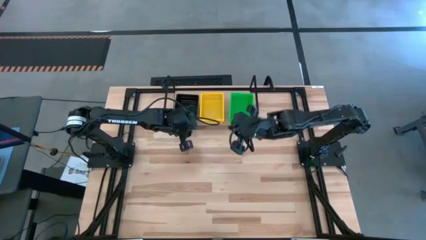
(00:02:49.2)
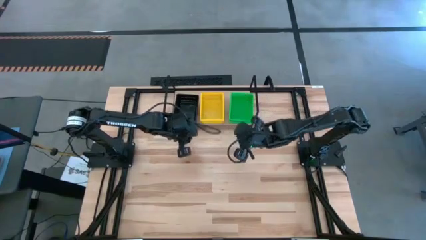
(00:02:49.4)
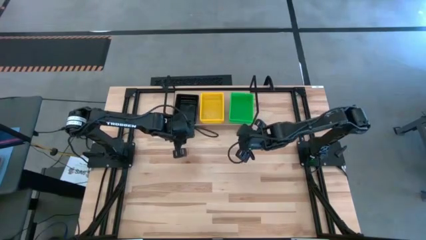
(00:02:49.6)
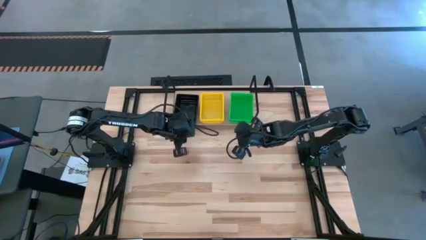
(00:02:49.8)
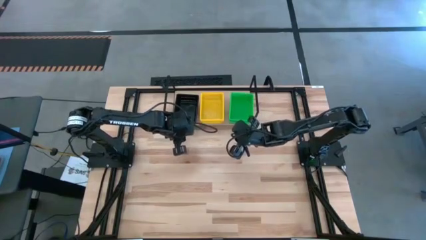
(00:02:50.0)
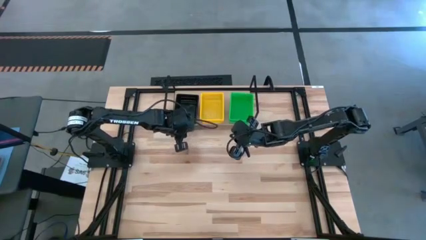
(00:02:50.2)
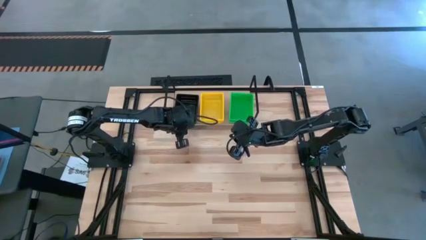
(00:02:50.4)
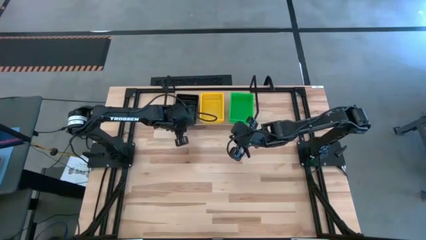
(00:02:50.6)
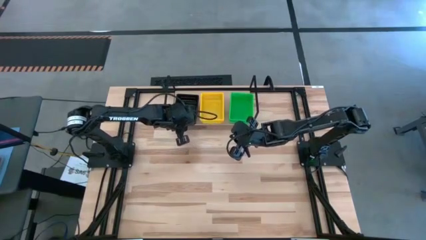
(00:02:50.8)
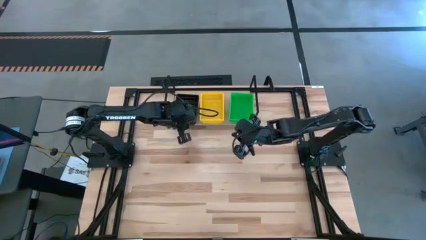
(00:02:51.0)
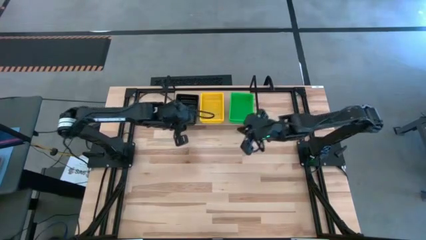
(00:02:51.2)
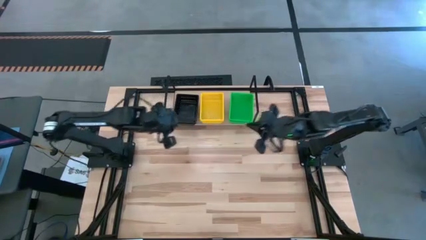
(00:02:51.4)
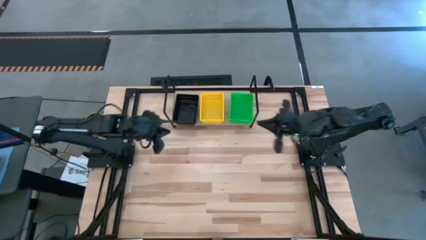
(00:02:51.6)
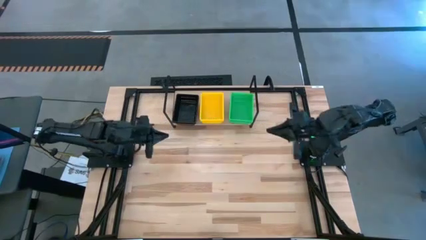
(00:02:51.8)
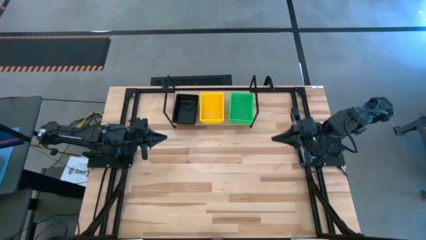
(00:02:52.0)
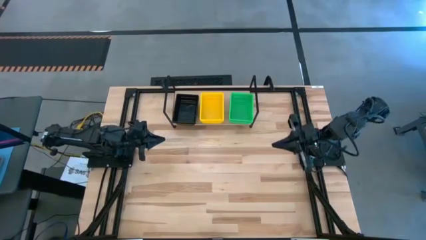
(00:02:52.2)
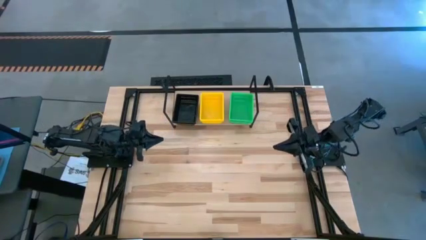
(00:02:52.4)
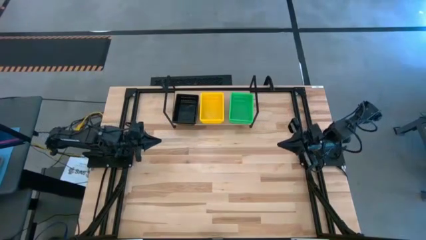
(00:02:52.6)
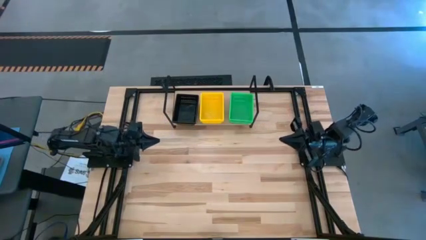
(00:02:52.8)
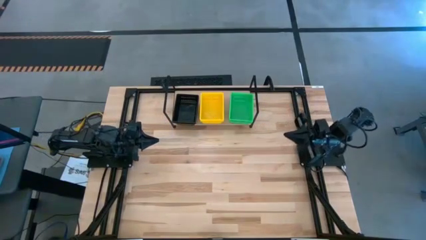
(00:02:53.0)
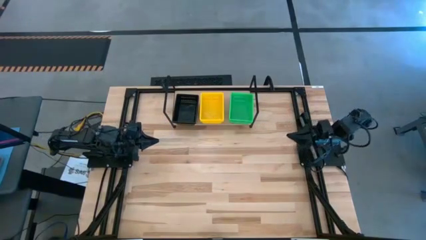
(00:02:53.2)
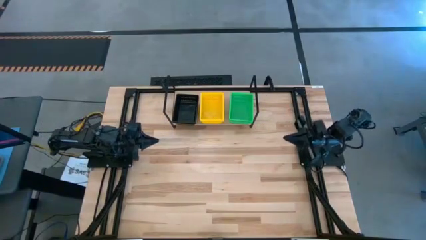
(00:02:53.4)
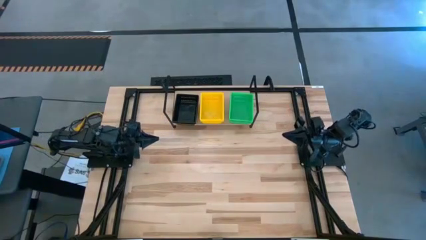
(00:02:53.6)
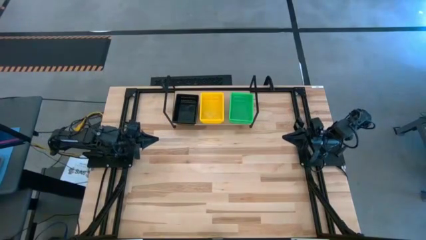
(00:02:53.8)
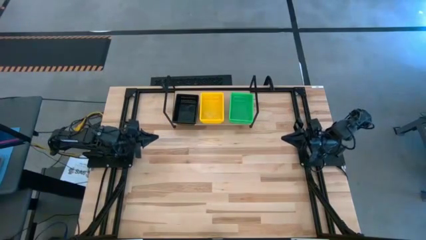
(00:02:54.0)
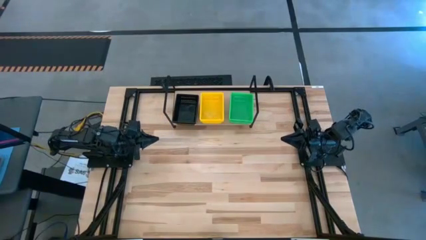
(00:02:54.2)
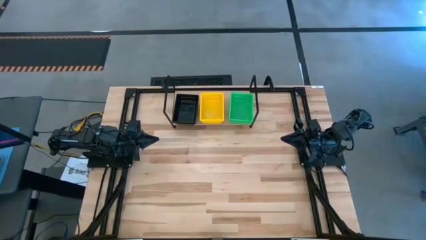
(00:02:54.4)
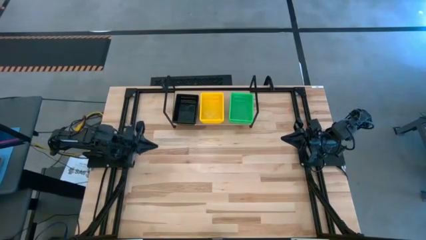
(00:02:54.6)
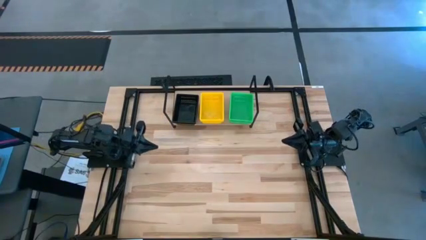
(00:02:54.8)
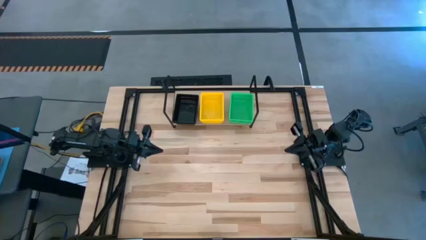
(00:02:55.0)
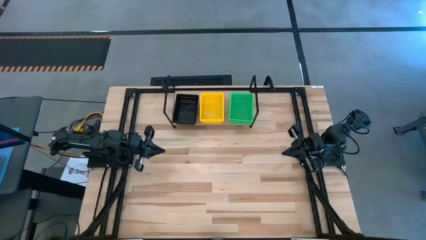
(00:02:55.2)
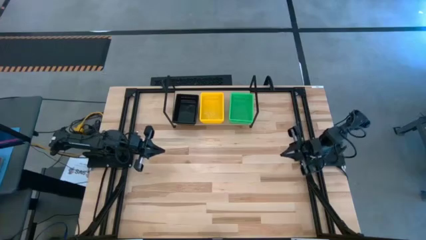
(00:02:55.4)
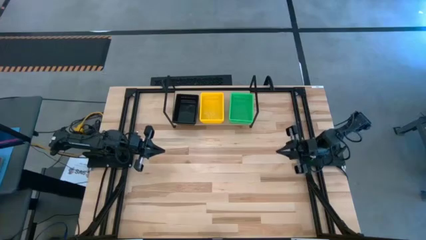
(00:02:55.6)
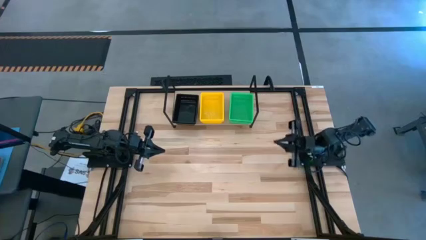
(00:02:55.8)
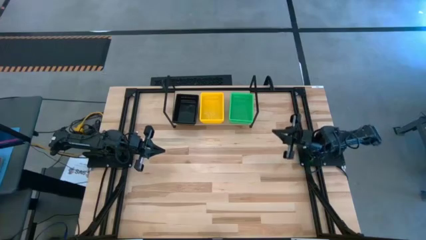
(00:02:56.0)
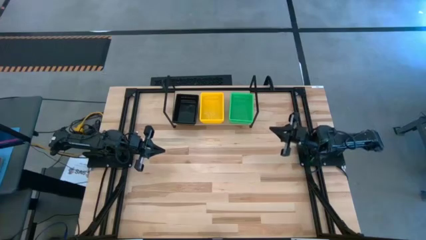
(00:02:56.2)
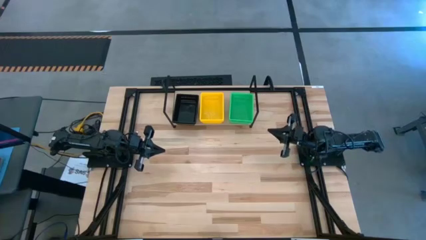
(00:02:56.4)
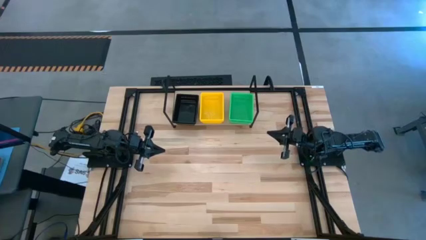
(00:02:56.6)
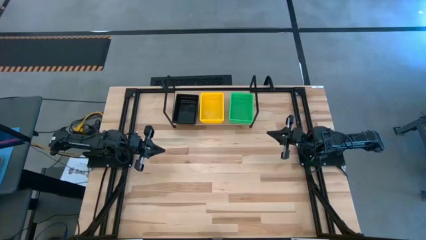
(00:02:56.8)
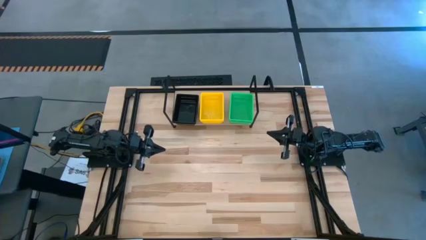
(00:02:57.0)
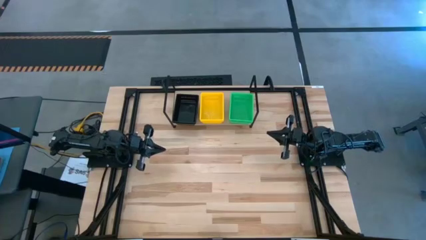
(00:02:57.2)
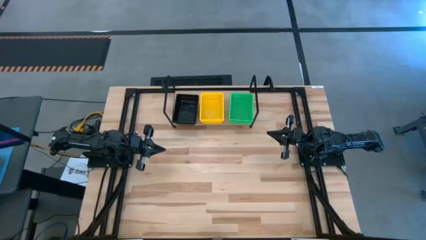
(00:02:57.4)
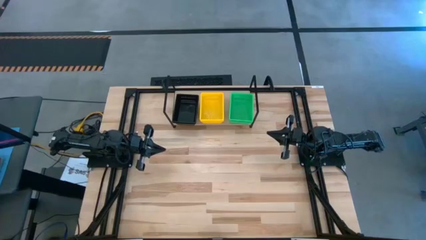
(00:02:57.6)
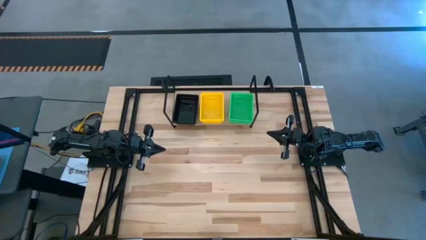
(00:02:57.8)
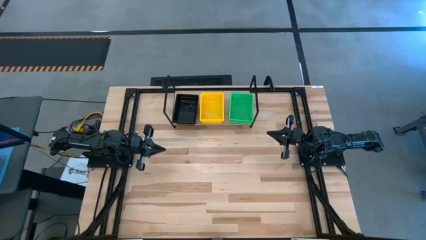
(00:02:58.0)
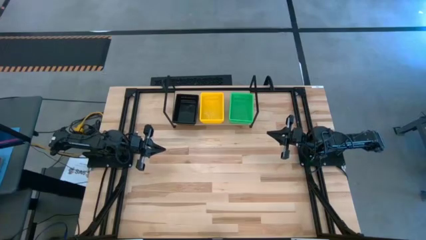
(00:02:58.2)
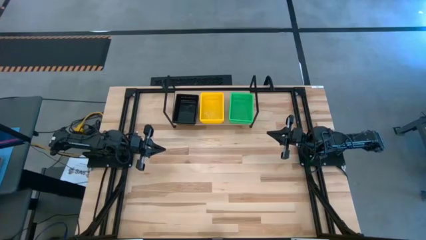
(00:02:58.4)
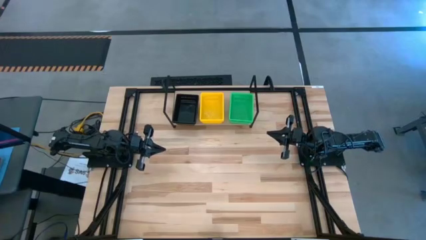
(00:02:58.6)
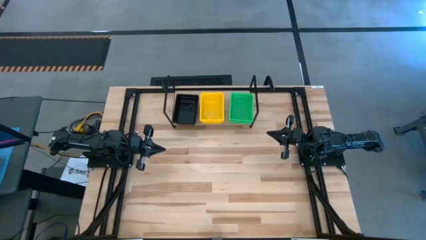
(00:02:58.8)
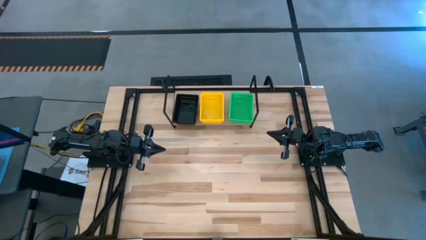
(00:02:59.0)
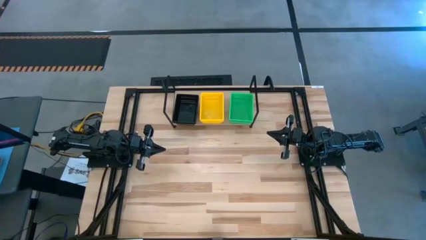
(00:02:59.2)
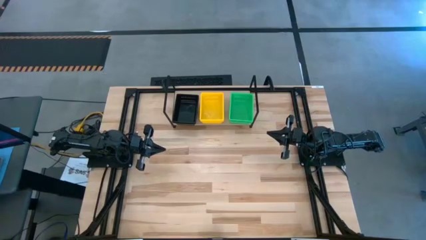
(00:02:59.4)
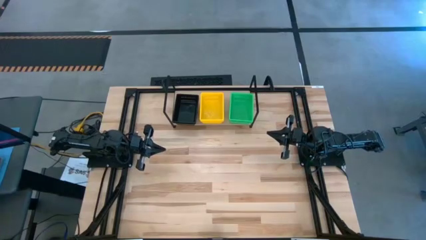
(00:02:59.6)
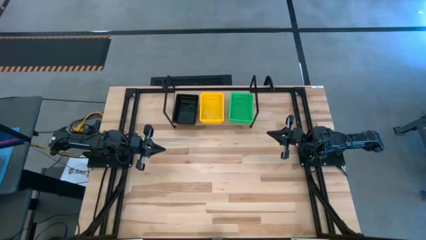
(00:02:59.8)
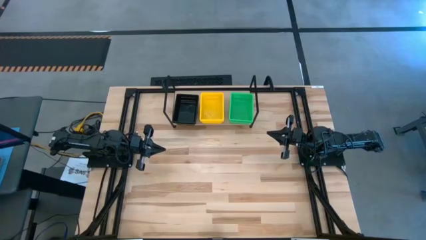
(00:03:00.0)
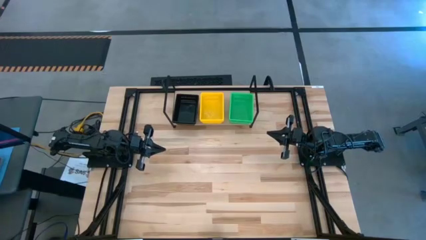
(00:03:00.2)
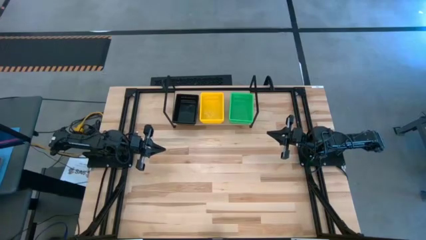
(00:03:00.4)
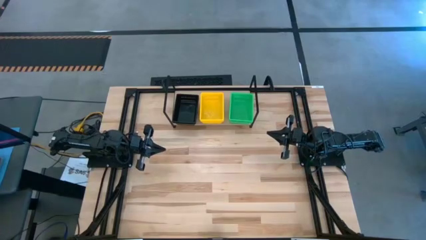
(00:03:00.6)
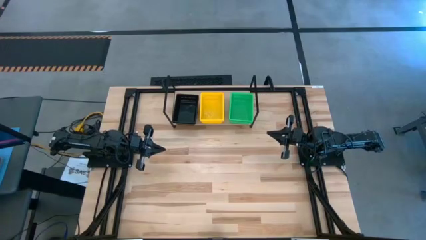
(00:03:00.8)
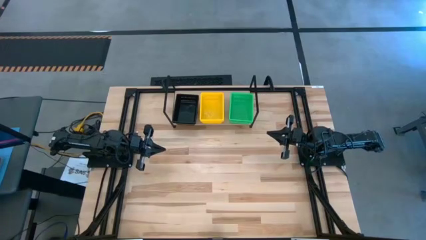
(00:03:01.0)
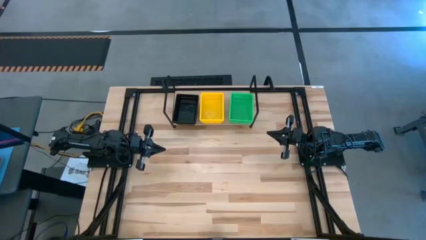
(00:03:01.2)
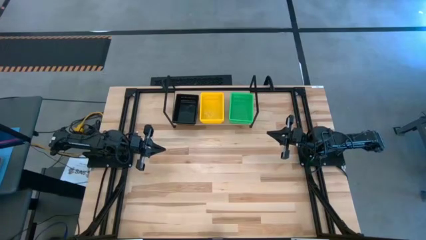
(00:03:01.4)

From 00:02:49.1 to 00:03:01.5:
Task: Stack baskets on shelf by color
Return to Home Position

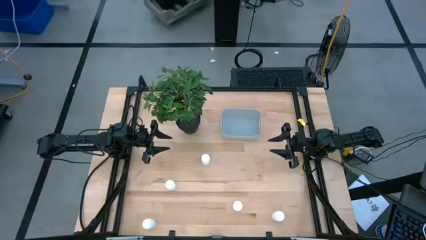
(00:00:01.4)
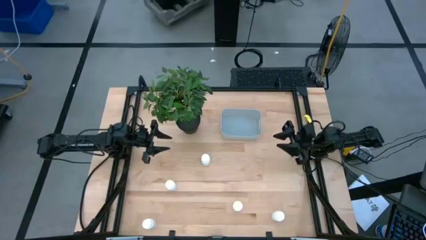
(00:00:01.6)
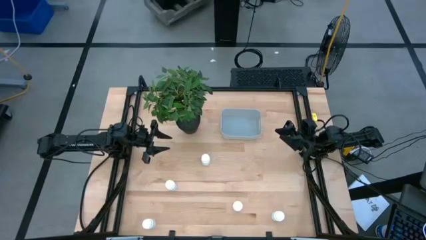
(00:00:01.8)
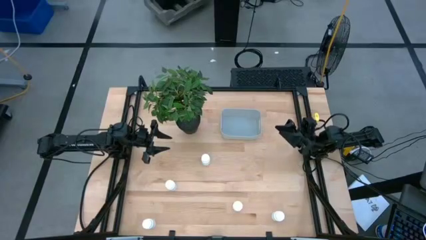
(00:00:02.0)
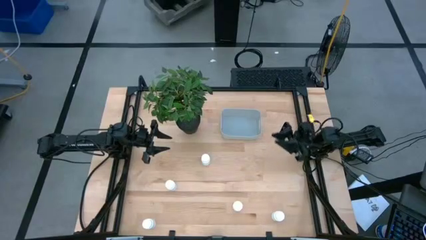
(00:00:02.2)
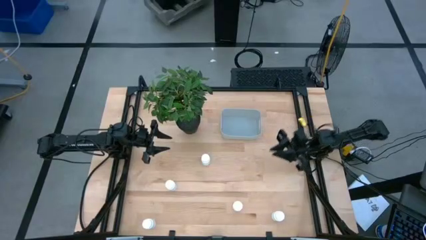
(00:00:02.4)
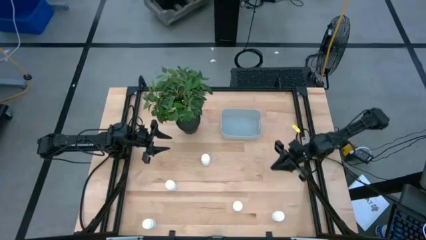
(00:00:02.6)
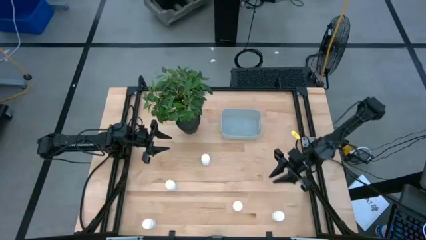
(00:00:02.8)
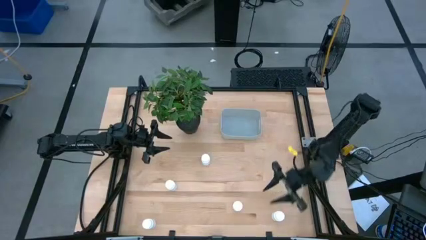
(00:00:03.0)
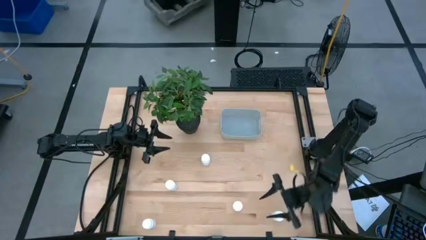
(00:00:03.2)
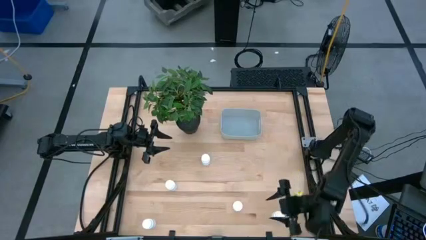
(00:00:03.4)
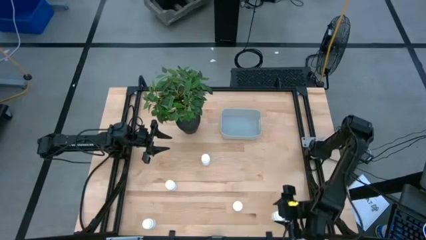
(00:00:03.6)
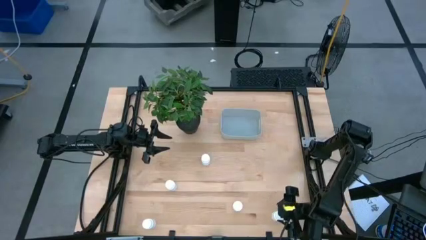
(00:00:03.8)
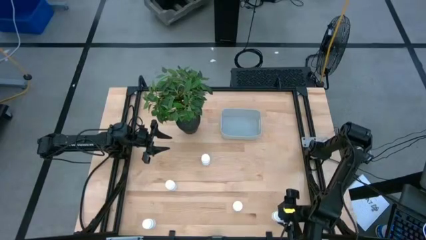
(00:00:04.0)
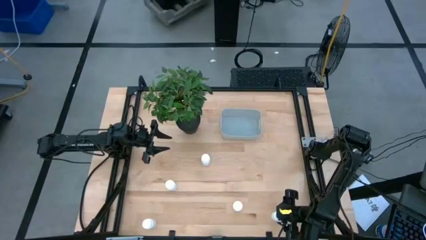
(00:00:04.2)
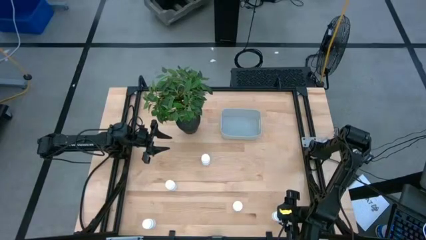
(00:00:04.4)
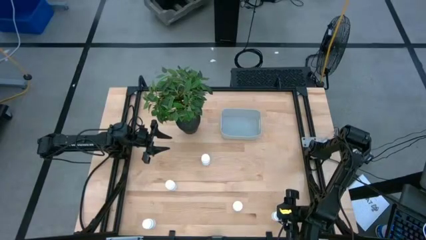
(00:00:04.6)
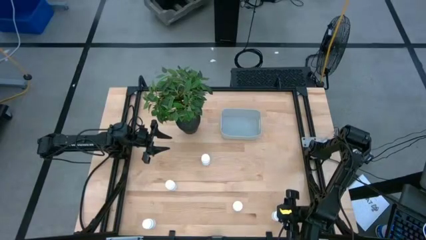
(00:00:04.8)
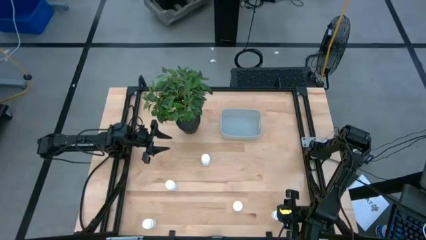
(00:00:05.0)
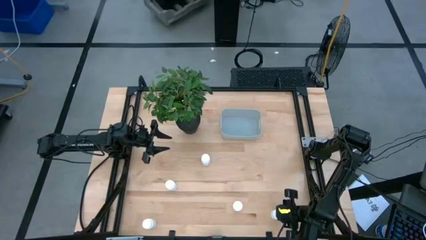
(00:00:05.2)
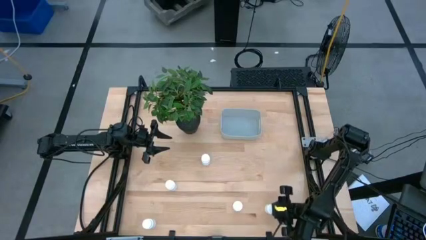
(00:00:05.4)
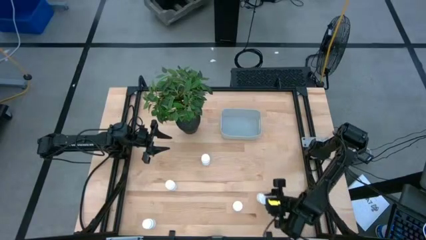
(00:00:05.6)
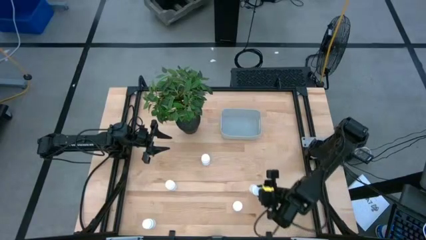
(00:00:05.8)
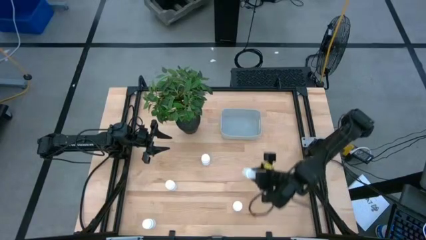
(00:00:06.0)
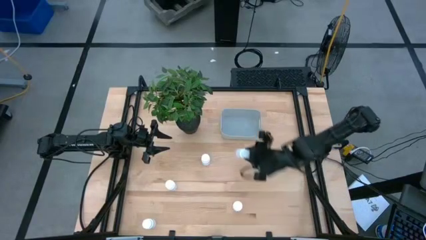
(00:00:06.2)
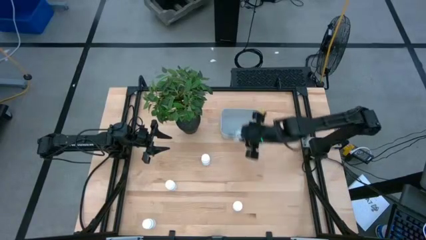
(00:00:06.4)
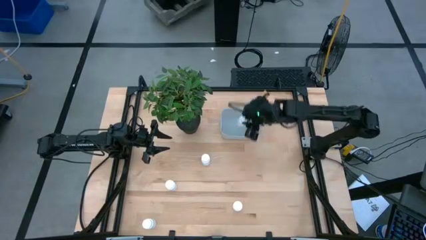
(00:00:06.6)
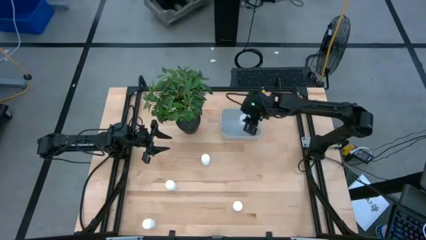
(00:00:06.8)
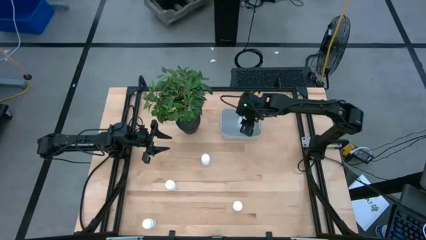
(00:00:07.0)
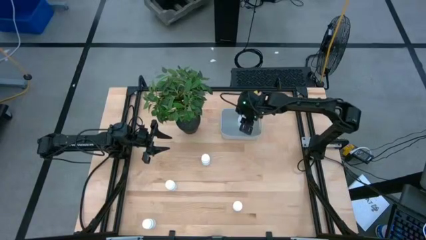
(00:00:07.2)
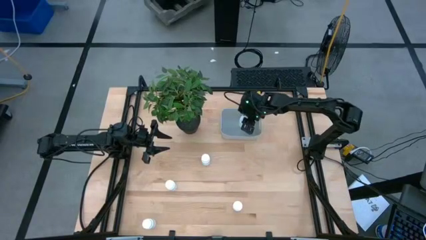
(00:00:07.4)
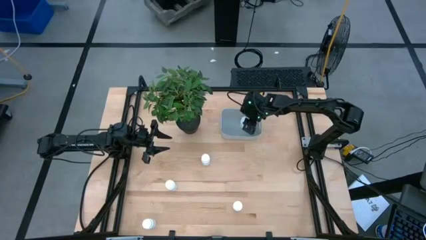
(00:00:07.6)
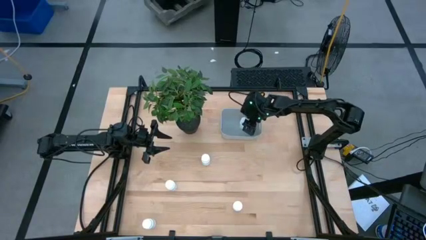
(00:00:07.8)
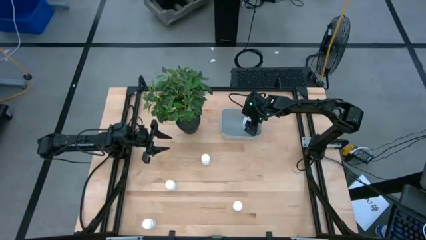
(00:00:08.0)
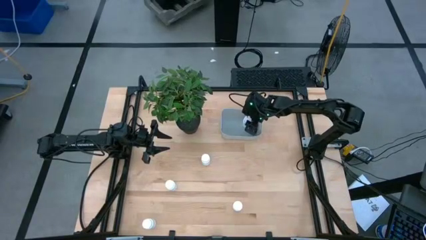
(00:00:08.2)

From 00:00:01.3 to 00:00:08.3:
Task: Pick and place pill bottles into a basket
Put the white pill bottle into the gray bin
